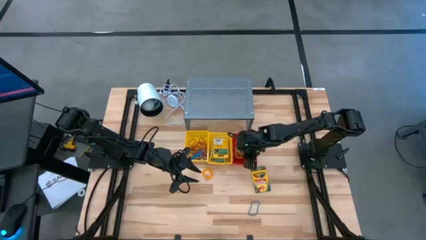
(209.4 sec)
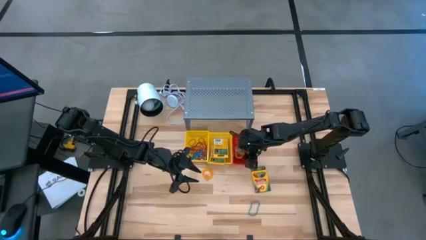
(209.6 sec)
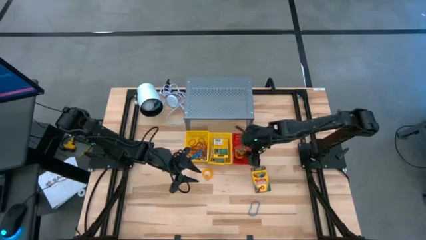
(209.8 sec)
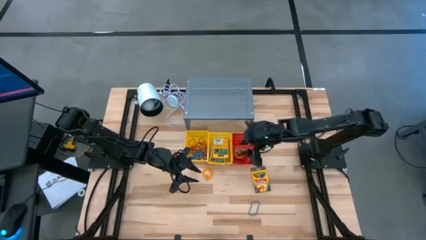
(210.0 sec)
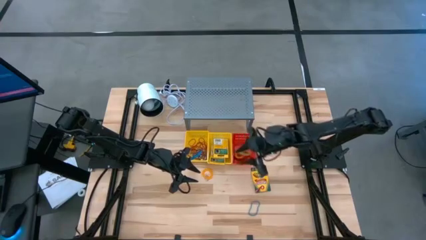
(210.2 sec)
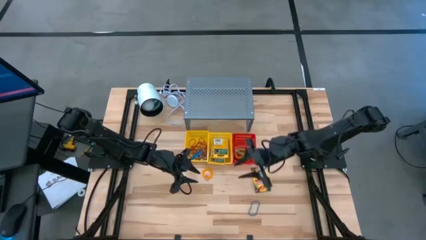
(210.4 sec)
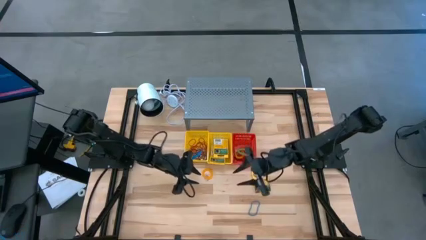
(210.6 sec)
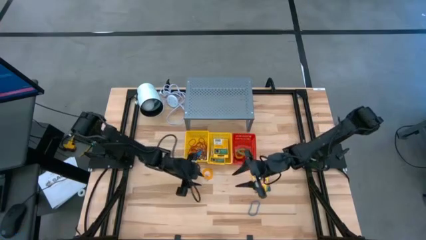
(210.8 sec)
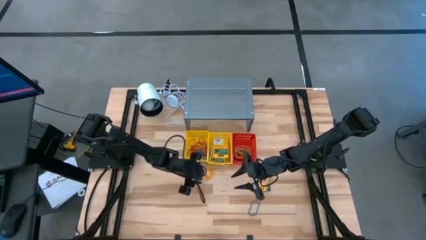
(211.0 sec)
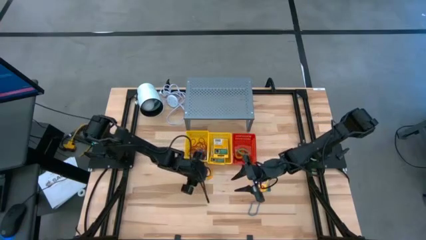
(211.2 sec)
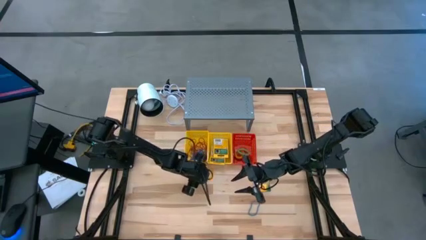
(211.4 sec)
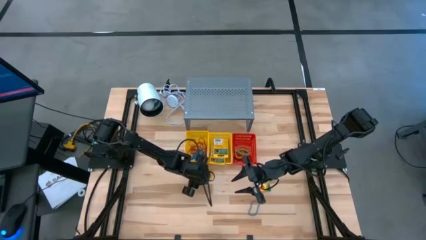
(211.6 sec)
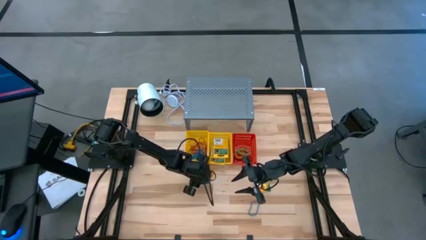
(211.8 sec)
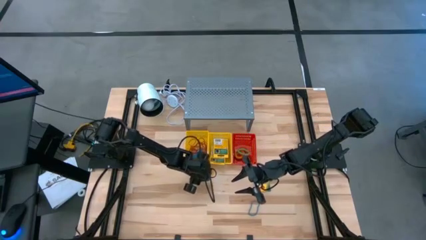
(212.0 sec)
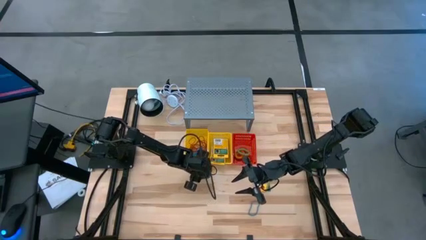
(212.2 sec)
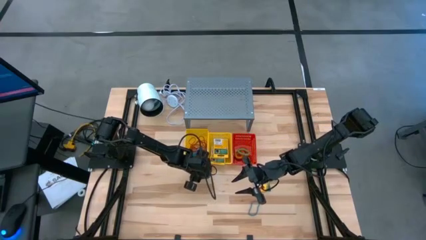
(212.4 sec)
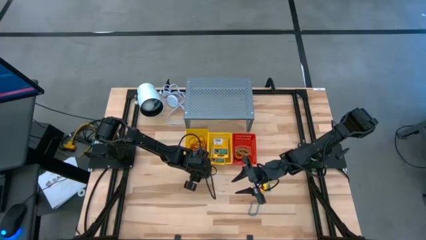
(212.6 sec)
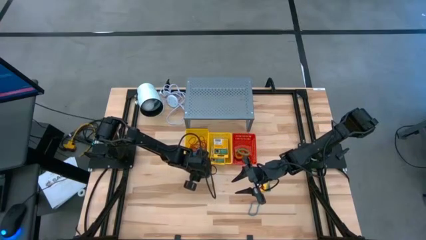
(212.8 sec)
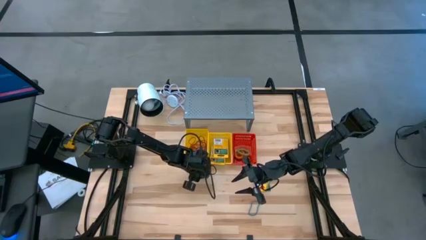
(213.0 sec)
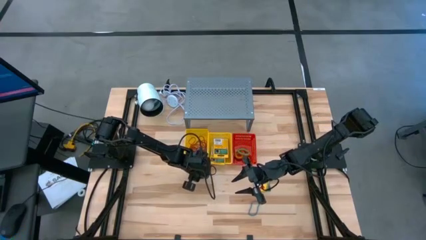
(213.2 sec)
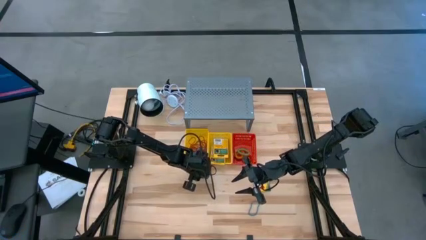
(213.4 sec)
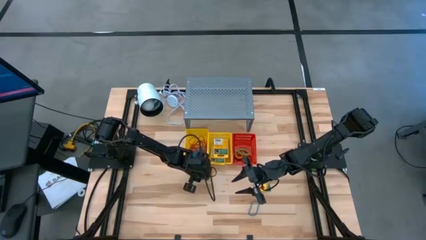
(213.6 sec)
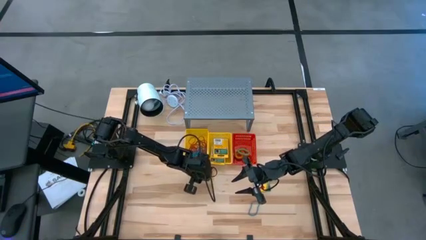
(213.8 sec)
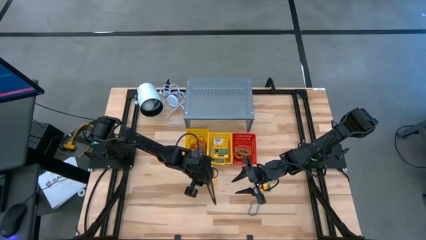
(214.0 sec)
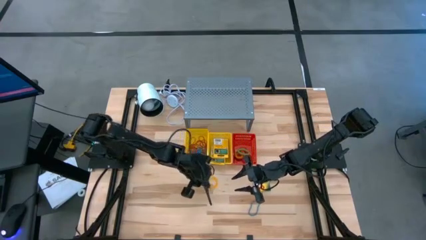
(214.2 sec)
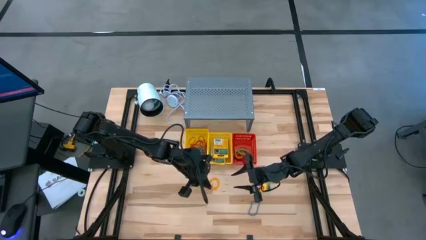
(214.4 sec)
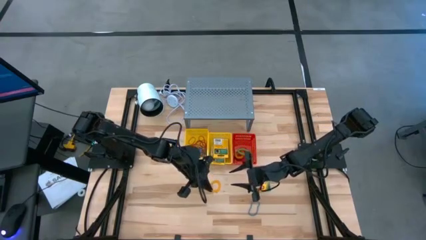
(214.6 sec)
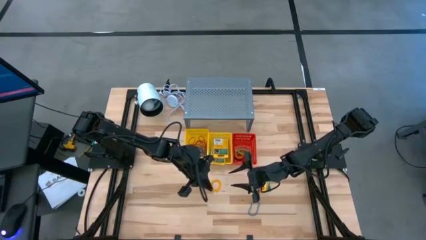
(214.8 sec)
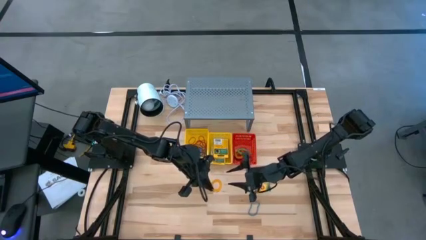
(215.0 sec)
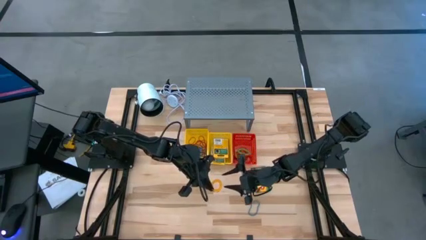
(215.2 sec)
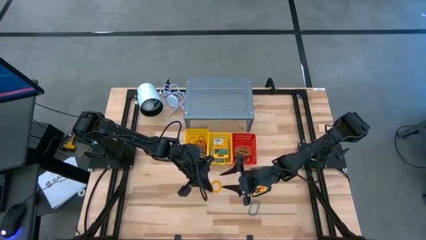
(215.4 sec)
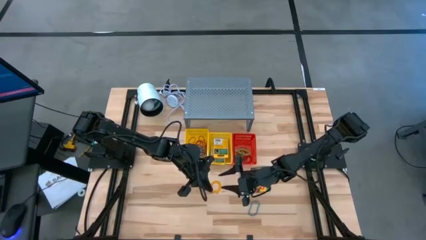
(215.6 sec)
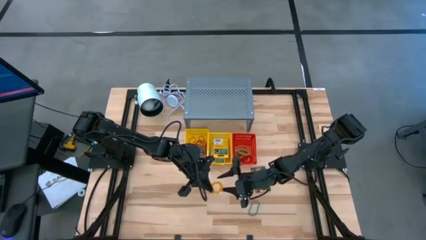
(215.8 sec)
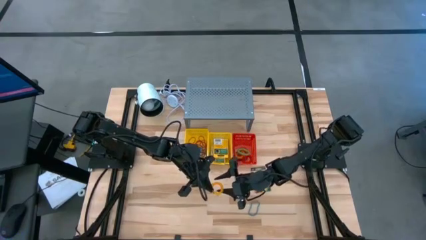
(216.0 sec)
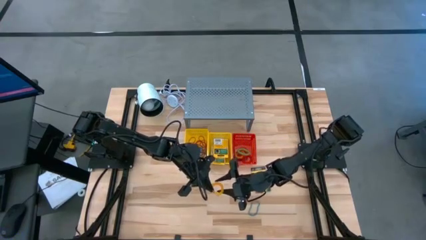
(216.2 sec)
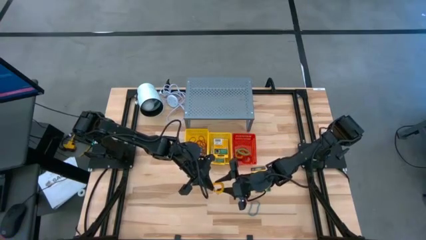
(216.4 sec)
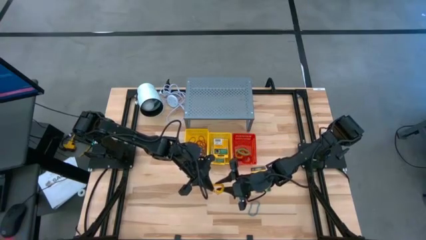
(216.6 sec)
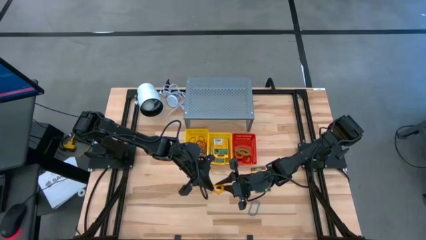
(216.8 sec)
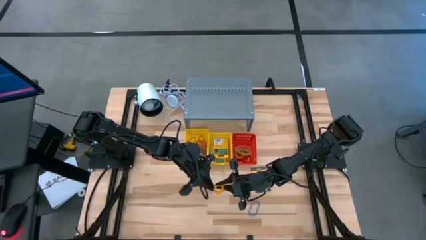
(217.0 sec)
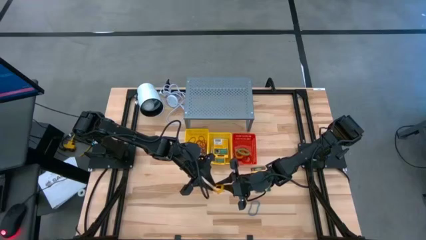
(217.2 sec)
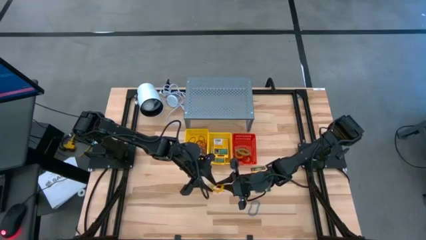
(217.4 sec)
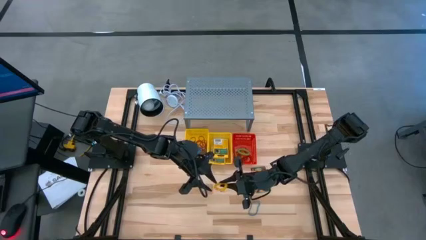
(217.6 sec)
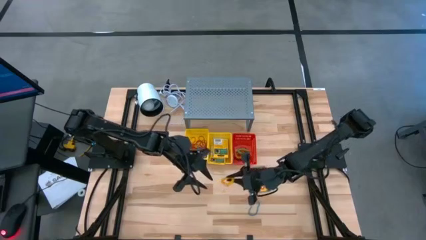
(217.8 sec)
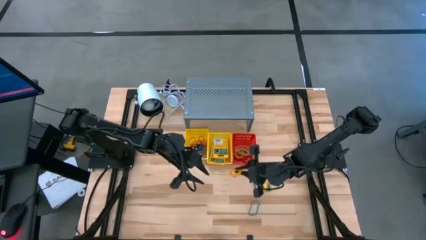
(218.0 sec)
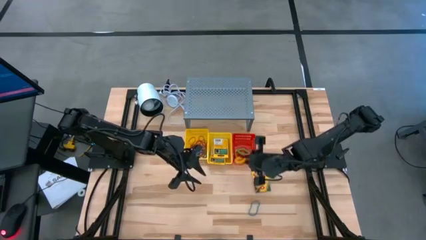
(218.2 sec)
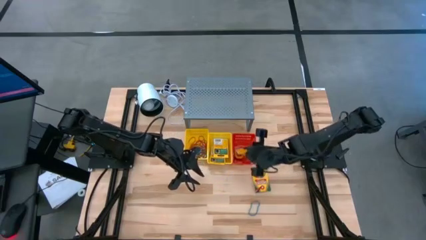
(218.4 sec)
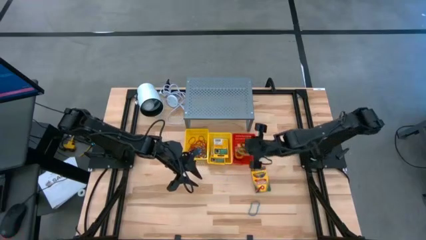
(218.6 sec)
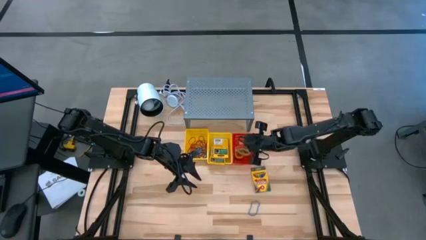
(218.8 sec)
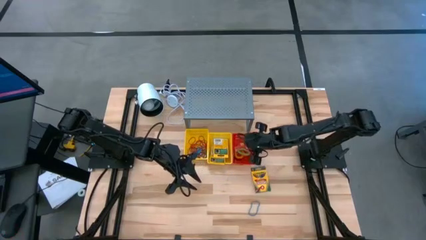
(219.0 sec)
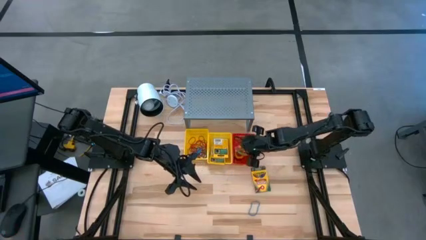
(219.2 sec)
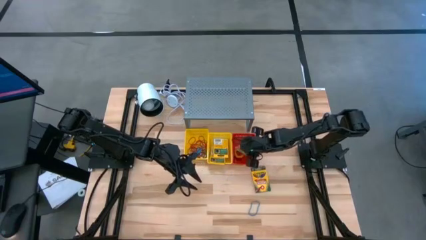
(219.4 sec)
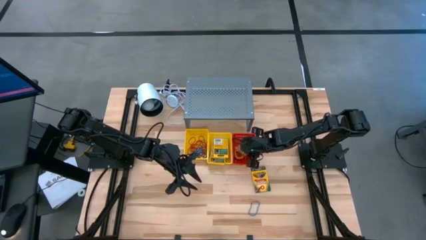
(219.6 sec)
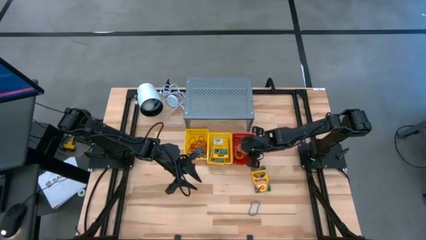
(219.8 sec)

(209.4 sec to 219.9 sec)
Task: Pick & Place Office Desk Supplies
Put the yellow spring keychain into the red basket

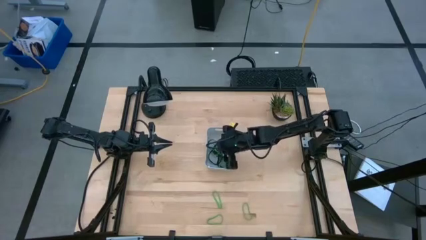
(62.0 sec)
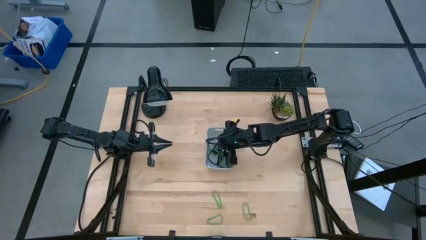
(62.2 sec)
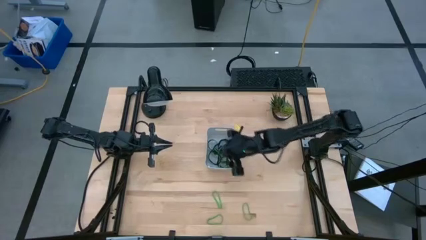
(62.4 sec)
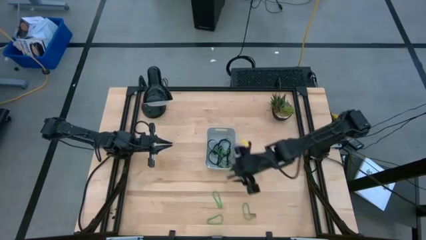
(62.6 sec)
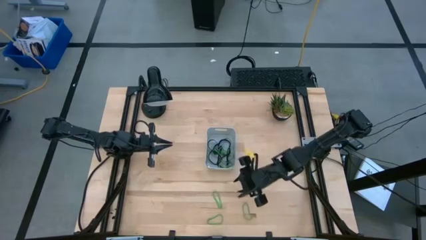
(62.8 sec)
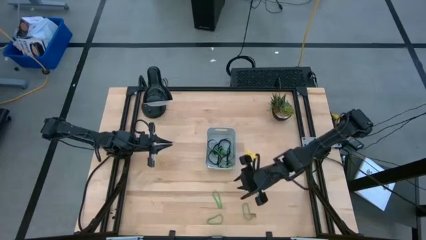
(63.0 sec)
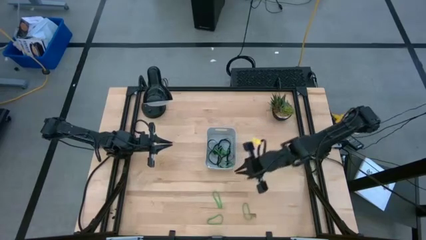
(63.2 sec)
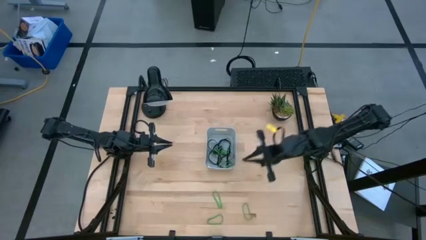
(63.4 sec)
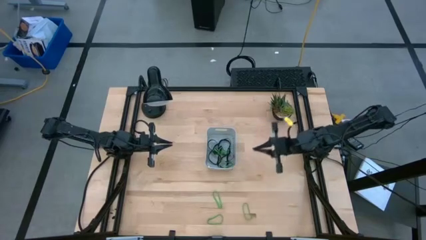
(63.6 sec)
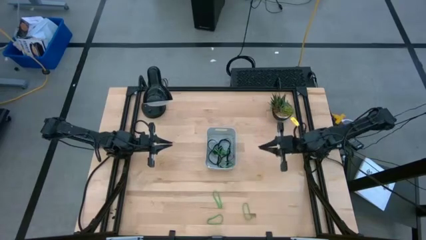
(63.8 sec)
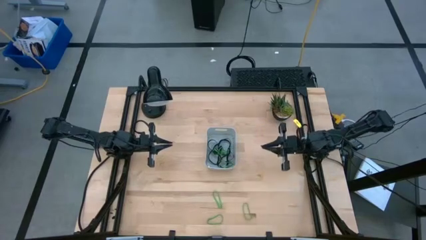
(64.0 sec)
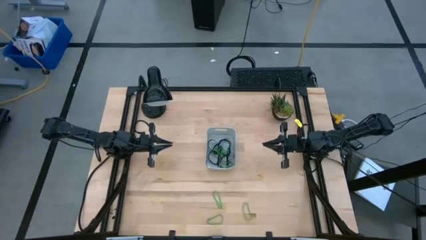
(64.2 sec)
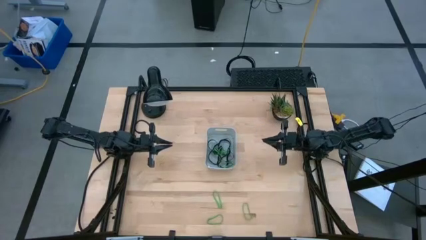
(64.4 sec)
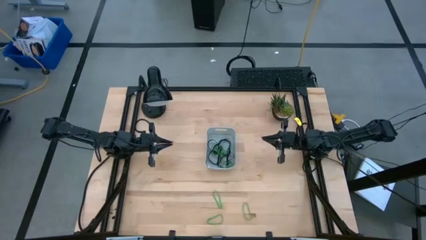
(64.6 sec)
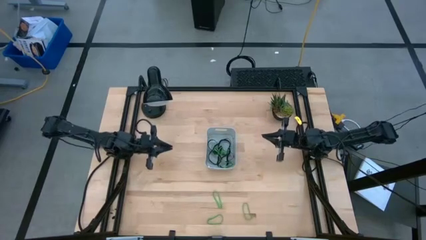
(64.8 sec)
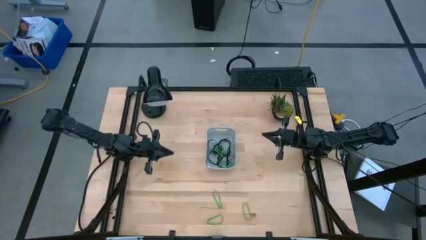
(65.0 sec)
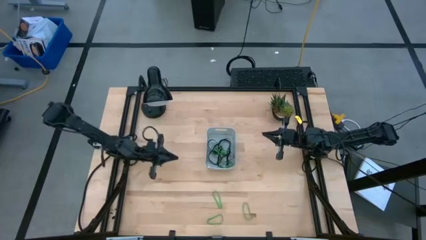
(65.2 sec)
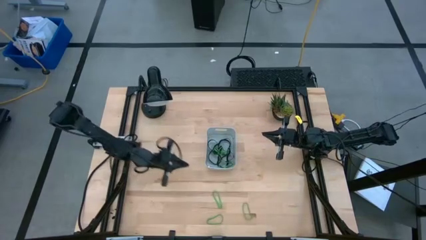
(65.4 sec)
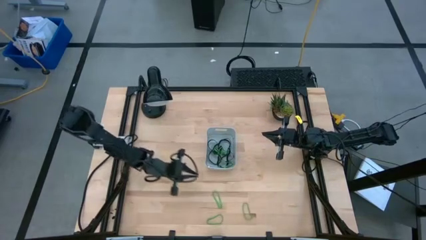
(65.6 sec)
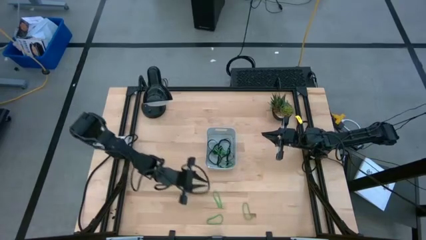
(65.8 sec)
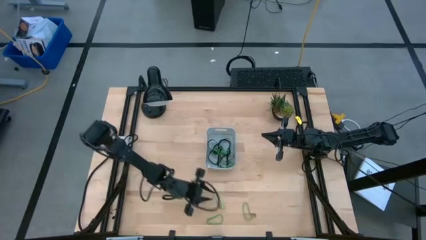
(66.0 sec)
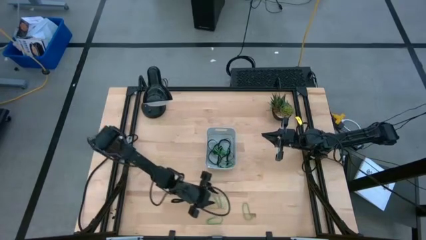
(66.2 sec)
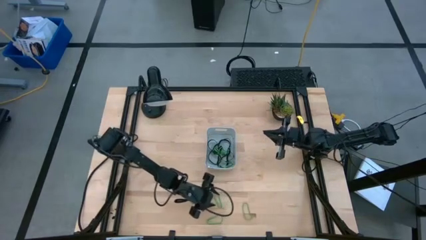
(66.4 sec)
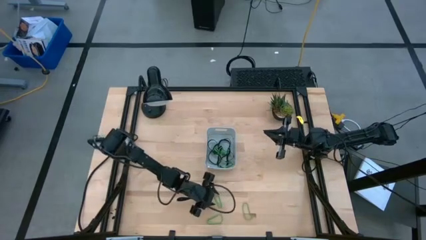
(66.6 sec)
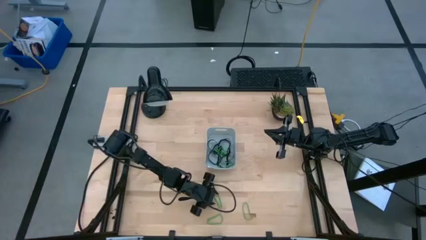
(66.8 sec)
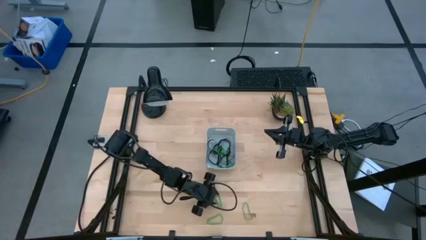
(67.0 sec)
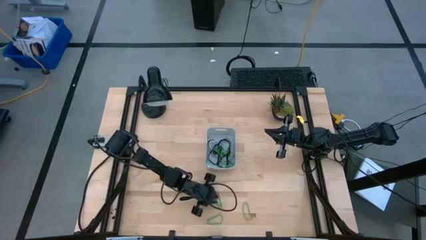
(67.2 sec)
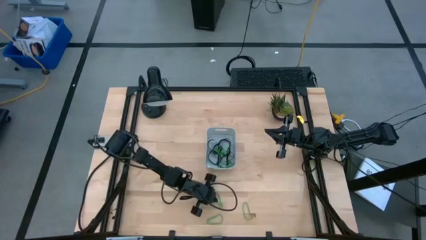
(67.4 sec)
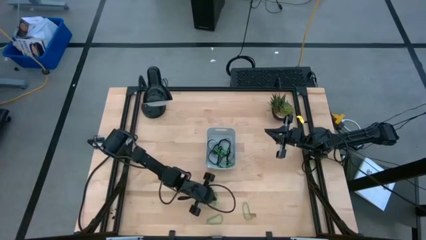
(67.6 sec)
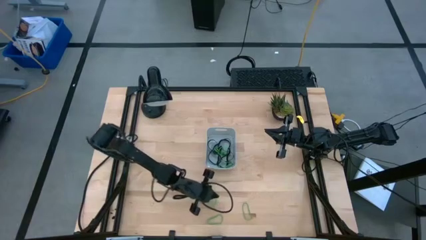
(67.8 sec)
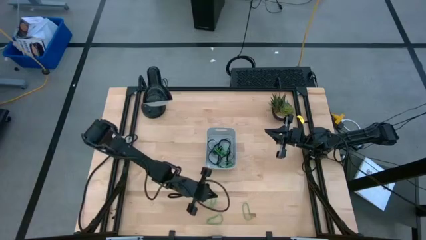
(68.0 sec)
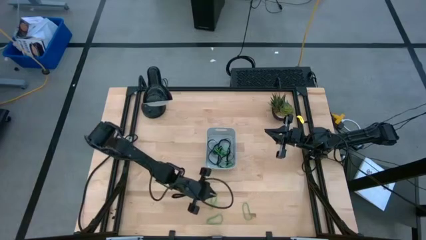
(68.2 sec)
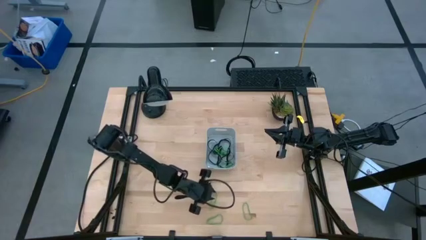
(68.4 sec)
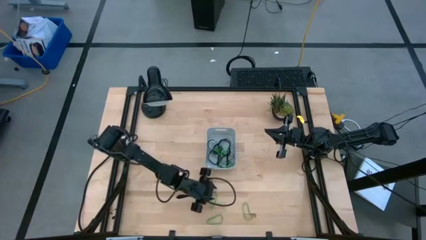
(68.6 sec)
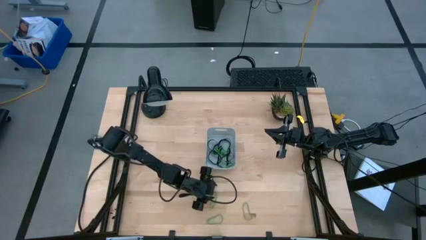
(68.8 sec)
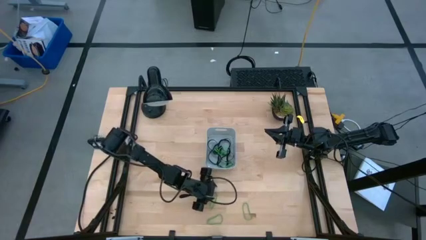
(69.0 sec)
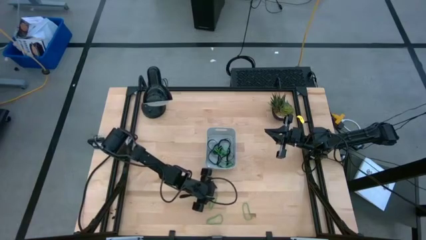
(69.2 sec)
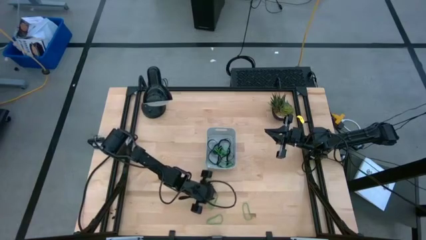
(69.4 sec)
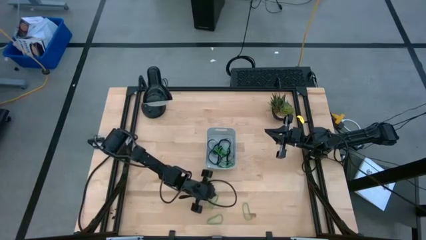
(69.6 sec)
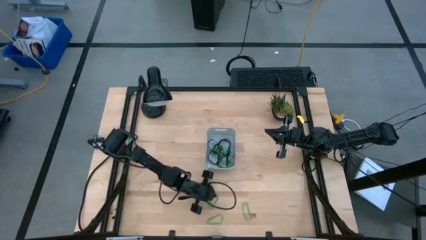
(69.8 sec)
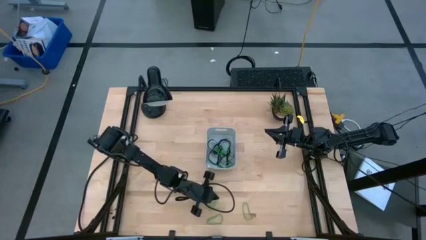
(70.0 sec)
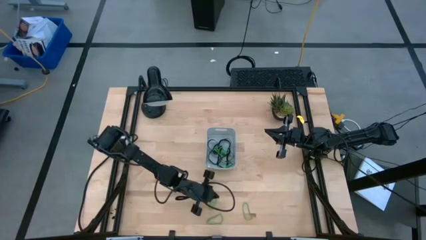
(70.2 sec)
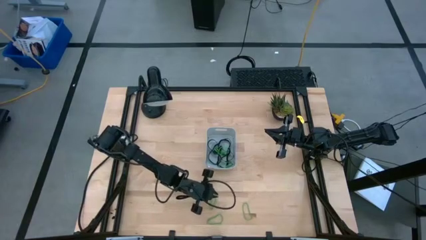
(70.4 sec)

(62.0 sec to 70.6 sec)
Task: Pick and place rubber bands into bin
Put the green rubber band into the gray bin
